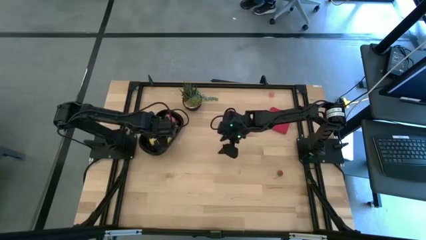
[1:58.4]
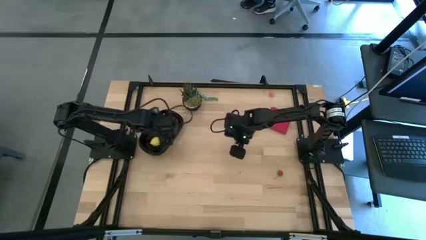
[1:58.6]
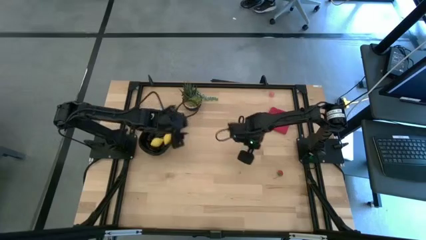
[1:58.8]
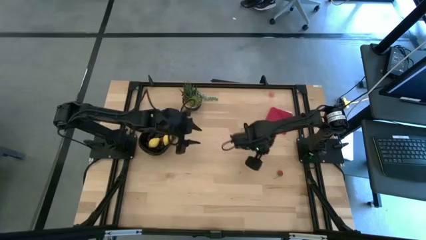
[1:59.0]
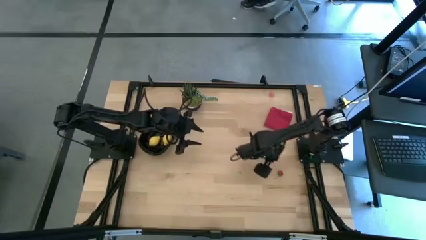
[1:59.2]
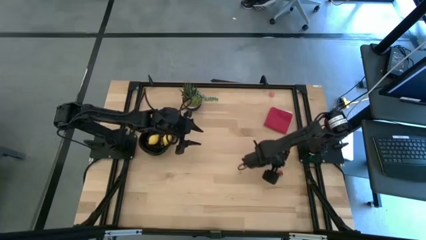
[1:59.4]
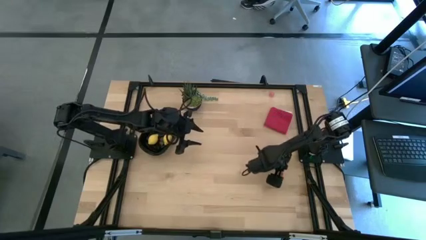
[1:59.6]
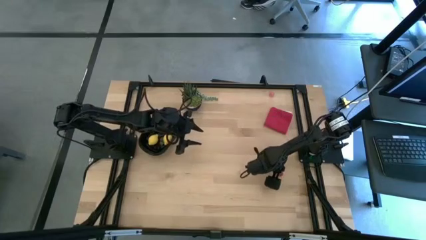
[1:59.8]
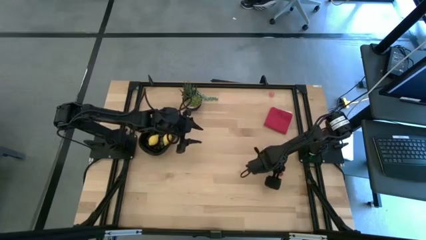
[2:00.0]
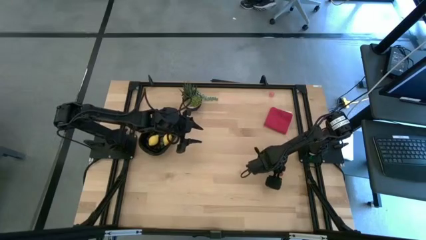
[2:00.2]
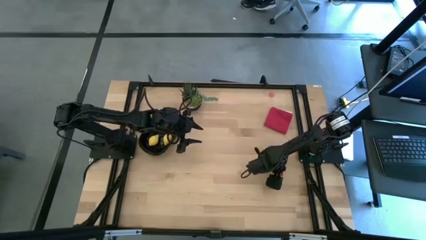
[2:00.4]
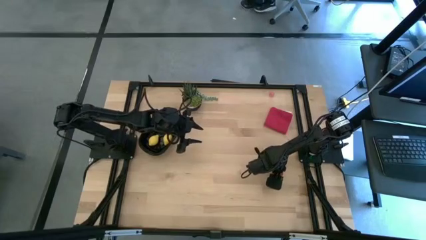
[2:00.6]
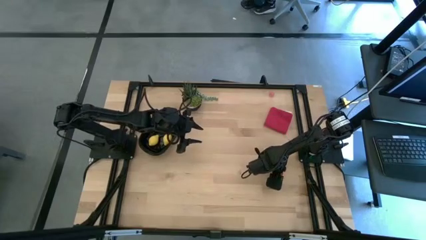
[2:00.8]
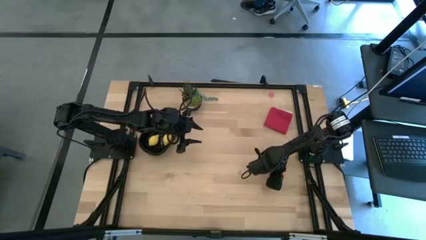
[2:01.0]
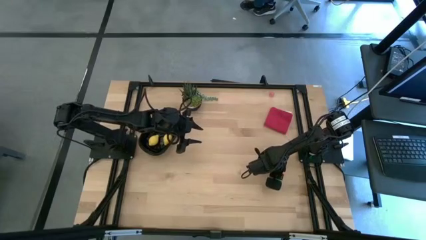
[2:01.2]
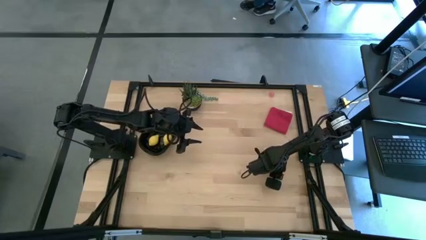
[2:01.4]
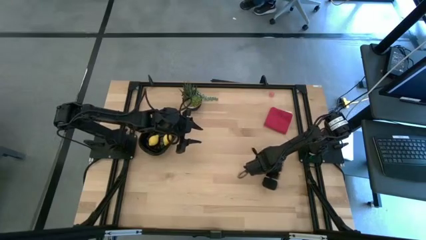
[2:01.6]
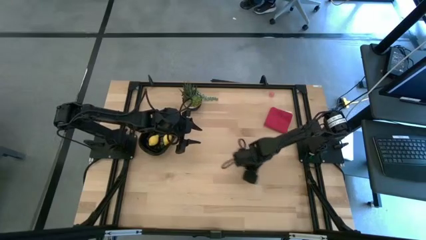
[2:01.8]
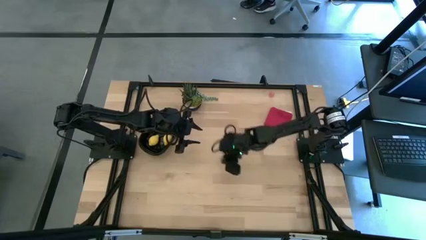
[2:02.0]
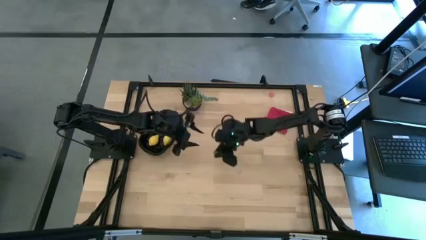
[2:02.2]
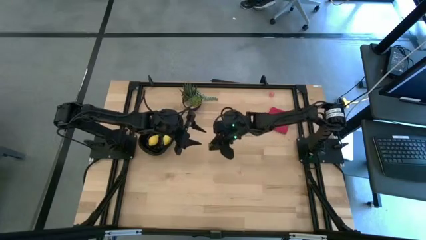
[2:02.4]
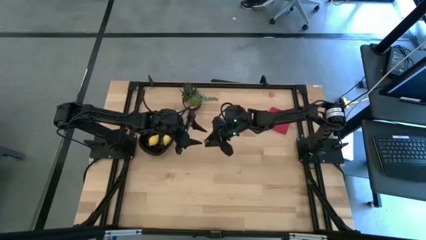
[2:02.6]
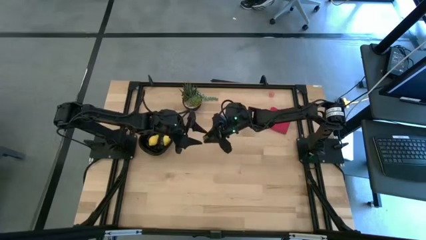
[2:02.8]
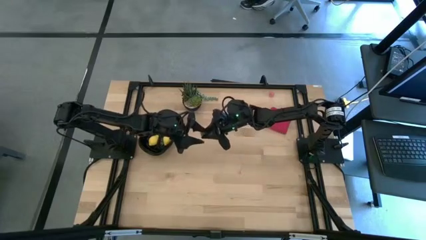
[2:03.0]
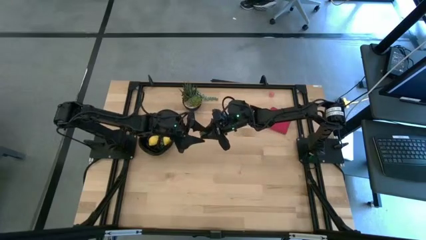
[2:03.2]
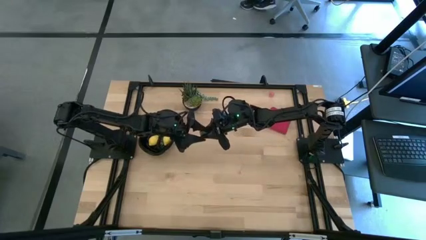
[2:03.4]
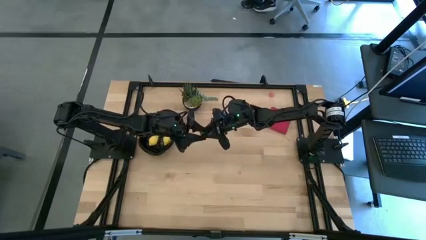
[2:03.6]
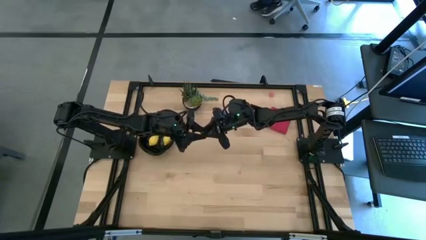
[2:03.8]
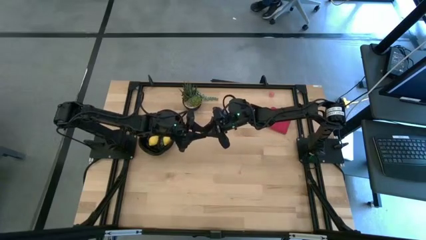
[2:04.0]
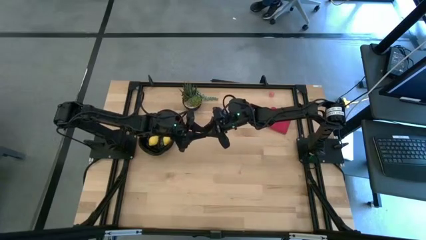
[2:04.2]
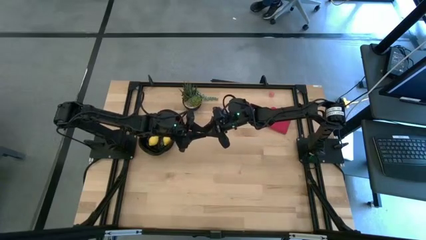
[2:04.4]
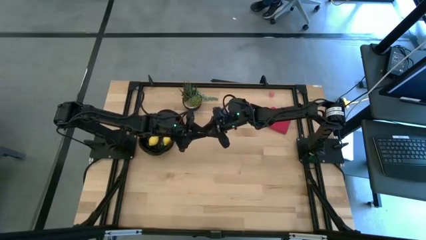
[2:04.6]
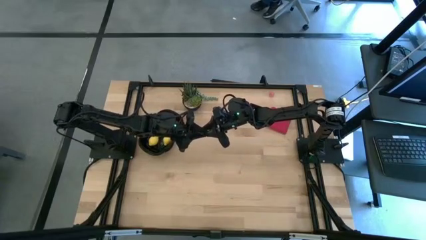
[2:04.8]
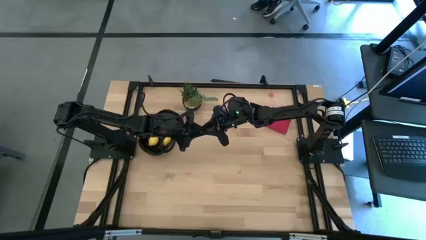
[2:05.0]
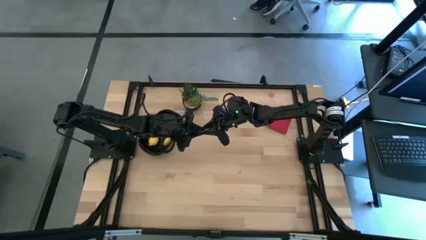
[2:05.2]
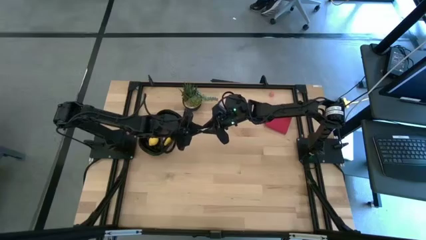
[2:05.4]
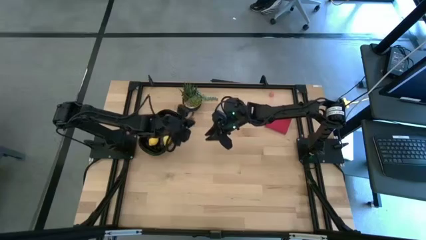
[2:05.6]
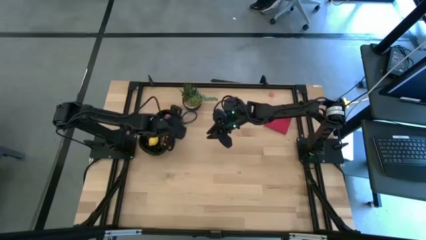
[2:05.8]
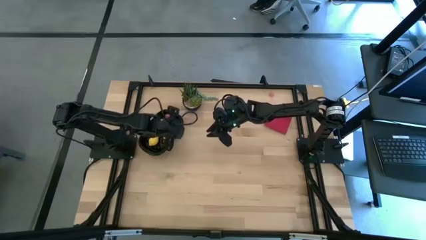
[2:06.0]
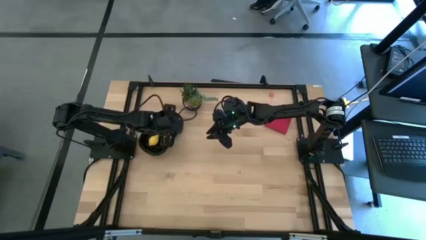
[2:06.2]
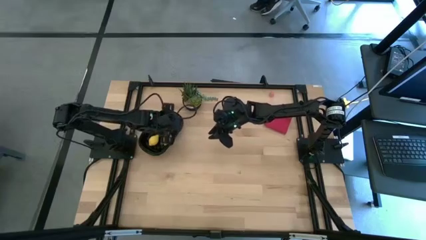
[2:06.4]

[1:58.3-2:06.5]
Task: Pick and placing Produce into tupperware
Put the red strawberry into the black container
